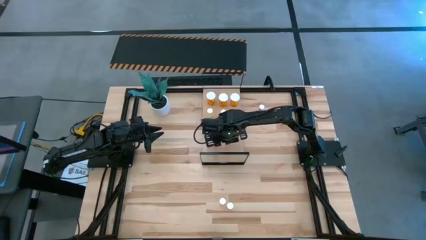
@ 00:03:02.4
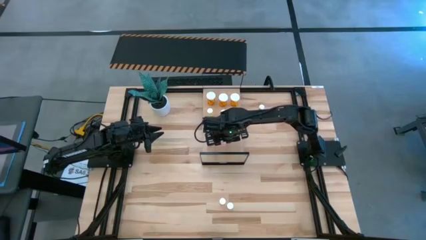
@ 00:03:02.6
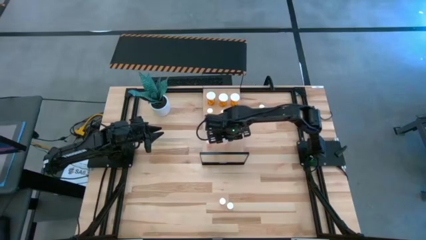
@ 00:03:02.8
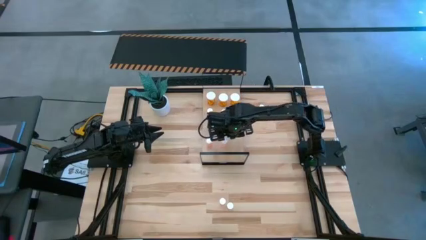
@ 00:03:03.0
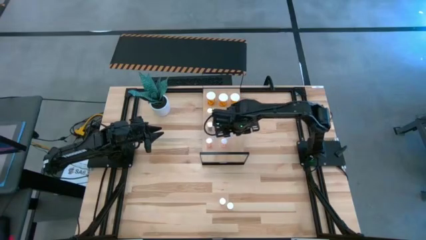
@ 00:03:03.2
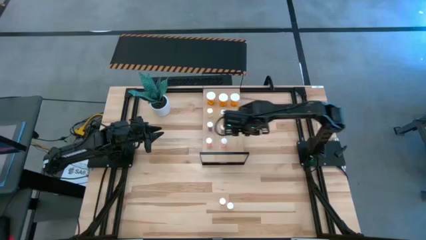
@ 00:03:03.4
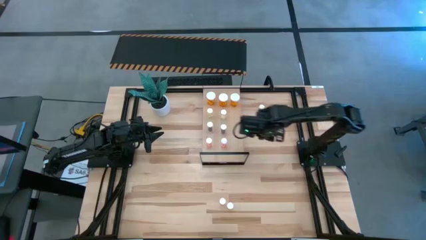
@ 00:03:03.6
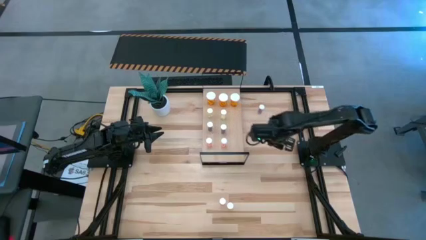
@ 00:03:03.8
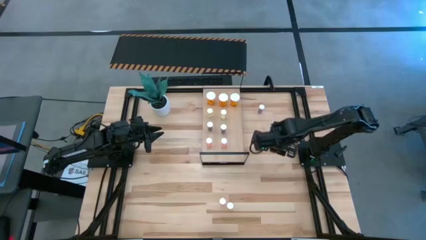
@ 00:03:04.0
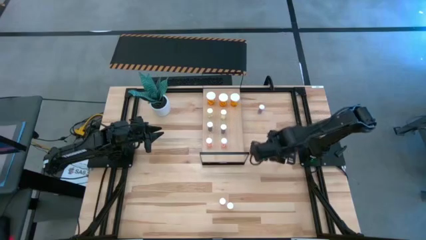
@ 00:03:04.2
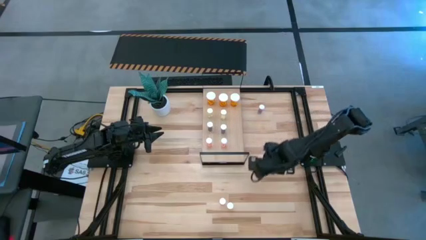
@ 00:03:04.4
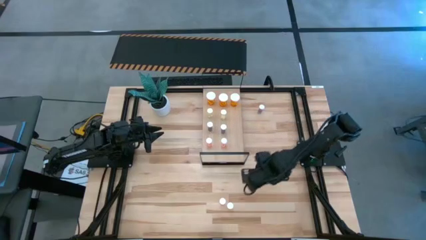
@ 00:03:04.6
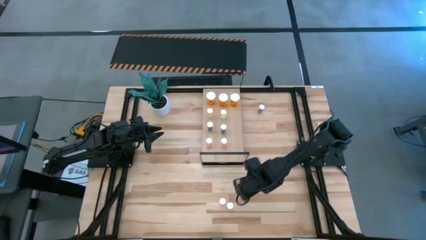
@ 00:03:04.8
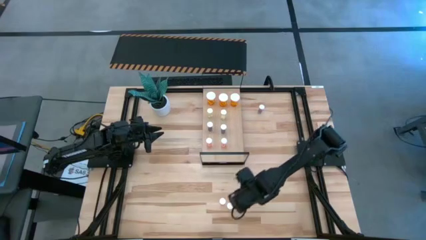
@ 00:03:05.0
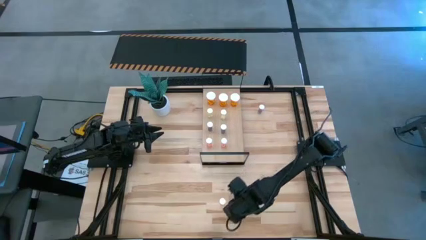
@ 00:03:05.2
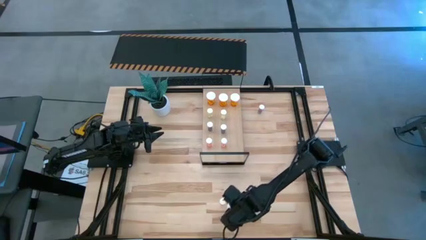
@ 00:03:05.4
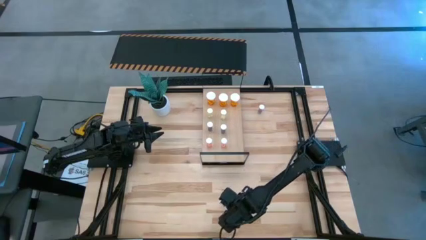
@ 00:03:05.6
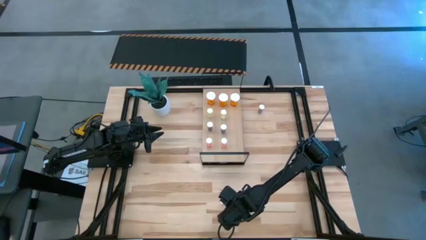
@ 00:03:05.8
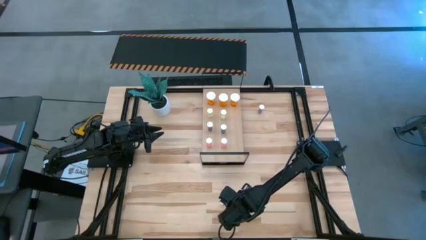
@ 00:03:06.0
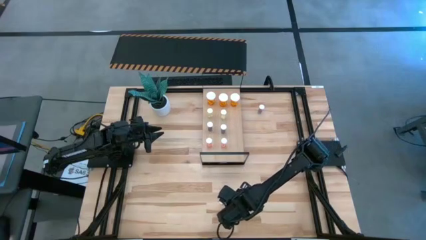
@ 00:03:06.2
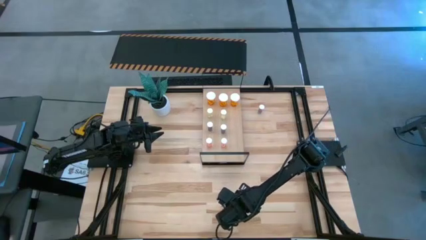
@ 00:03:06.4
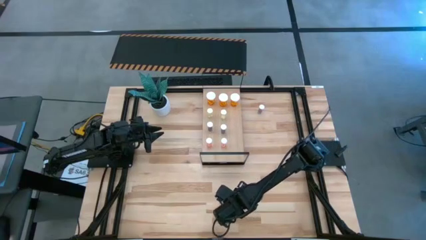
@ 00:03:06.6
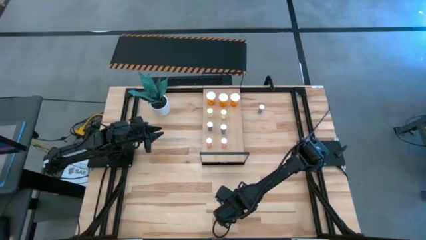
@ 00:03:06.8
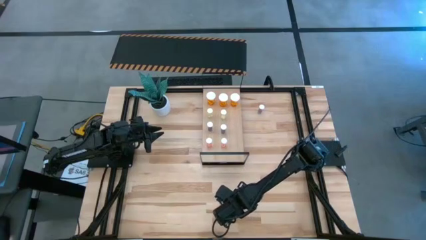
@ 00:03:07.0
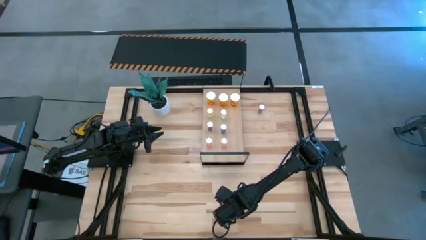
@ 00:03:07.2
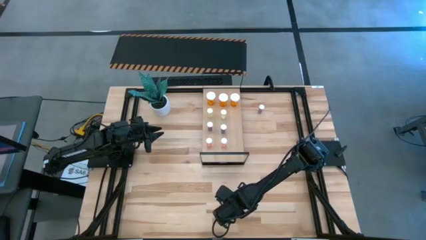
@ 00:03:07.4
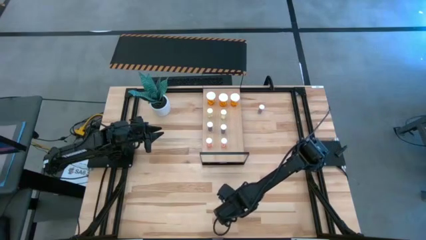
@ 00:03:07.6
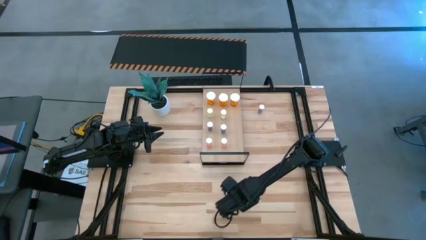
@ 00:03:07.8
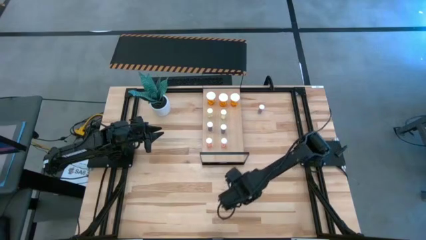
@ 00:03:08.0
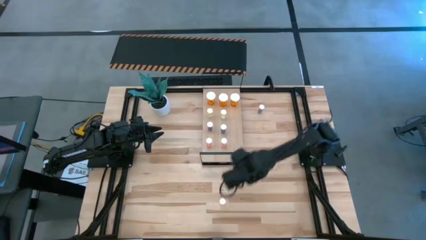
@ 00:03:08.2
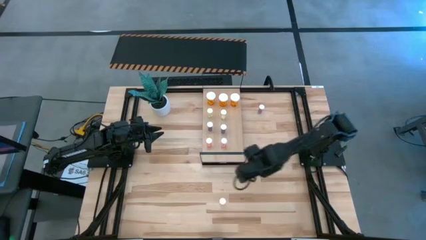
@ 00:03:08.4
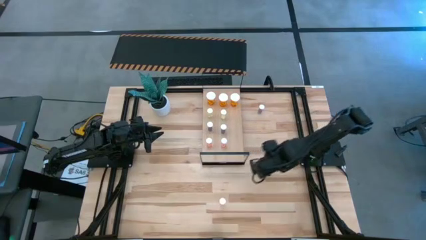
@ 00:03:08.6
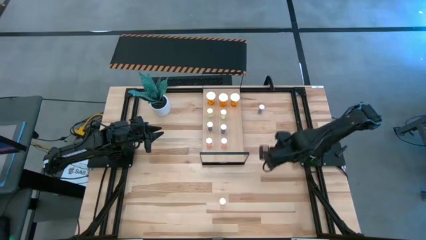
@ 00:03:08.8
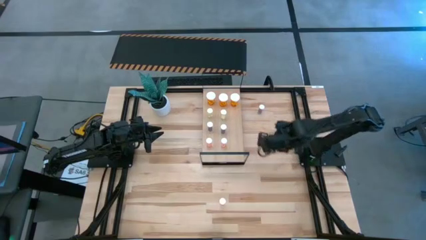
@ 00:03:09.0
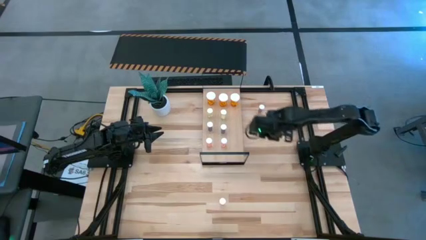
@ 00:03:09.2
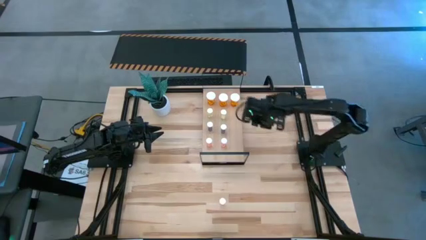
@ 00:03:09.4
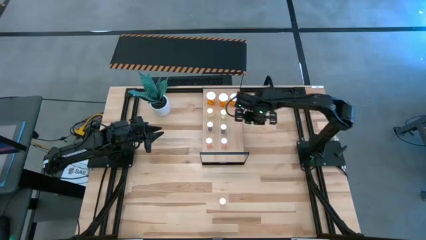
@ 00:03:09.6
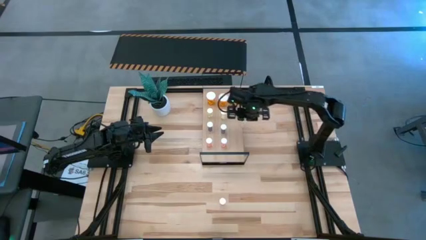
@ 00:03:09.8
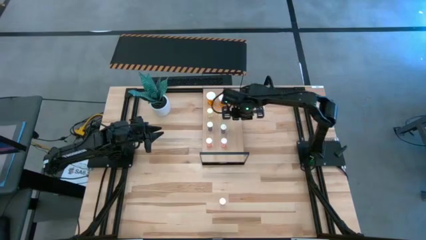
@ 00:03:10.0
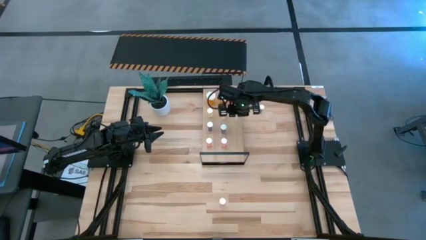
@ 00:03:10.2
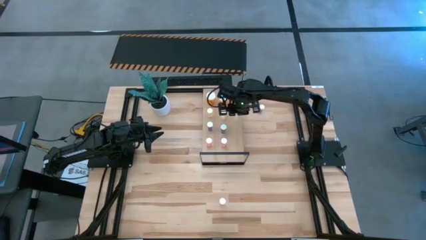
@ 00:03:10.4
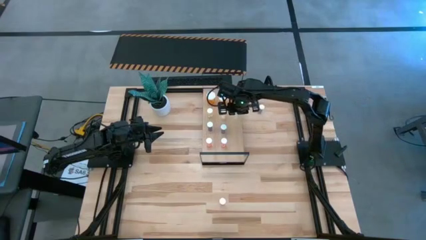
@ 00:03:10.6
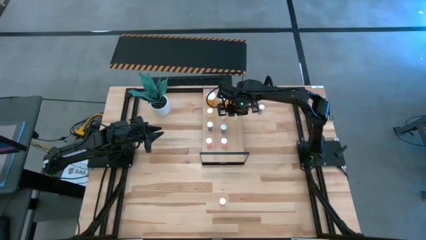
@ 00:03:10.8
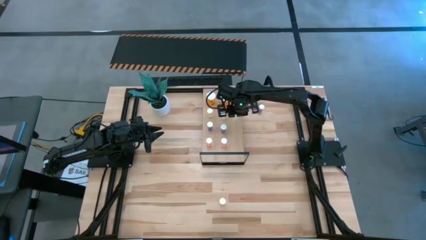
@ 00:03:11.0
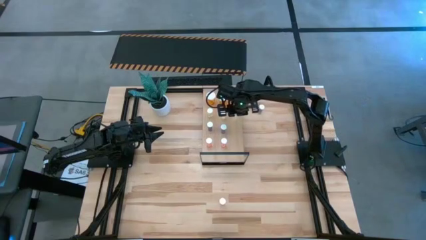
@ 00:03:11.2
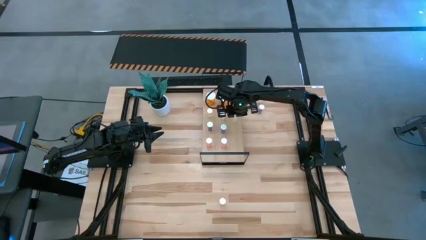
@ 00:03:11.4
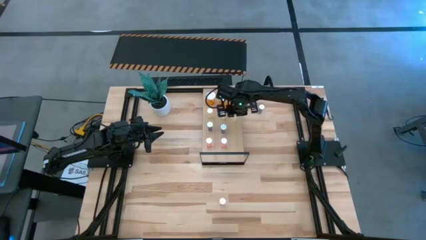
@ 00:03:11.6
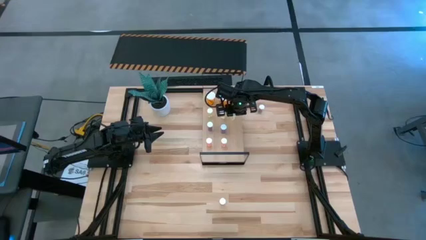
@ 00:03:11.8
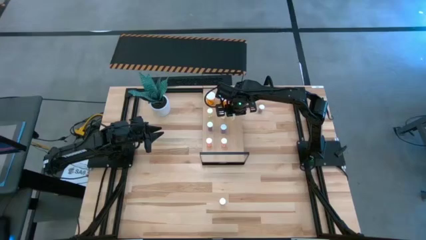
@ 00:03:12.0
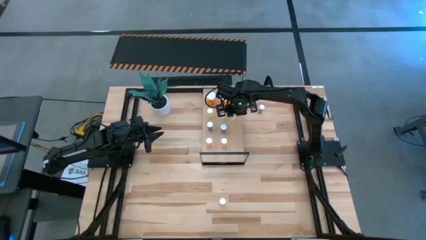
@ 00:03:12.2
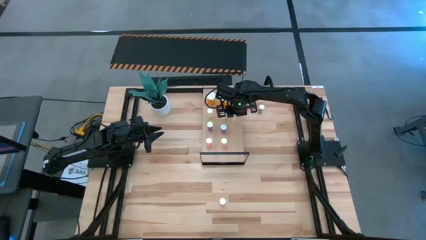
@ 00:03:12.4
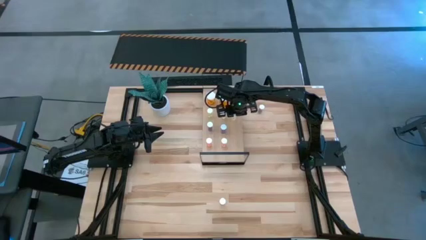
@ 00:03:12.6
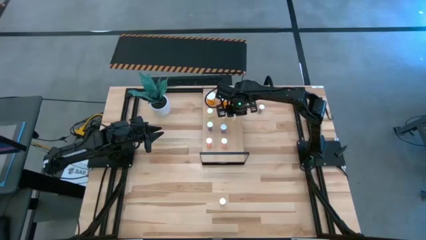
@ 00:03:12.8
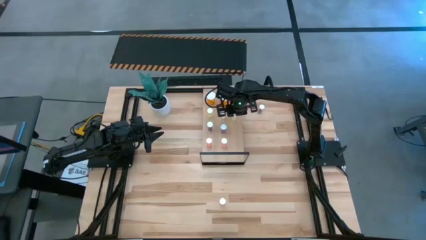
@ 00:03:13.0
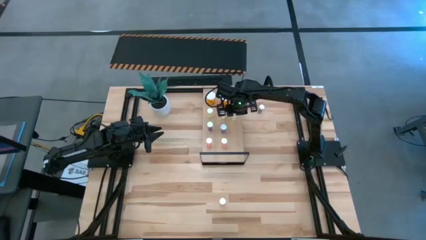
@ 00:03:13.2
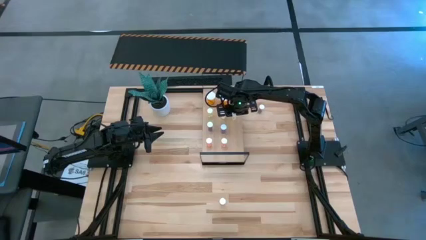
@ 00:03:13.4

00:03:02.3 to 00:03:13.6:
Task: Pick and place medicine bottles onto shelf by color
Put the small yellow pill bottle on the shelf aligned with the other small yellow pill bottles

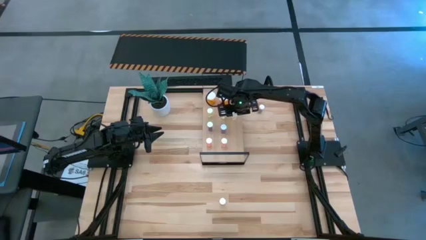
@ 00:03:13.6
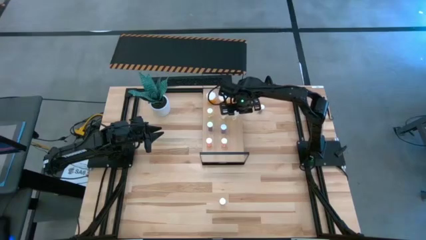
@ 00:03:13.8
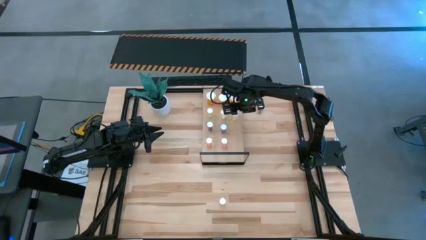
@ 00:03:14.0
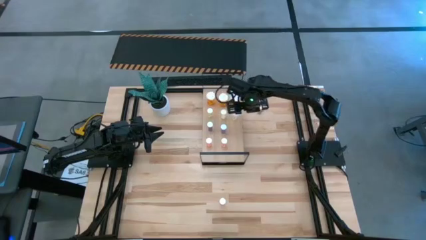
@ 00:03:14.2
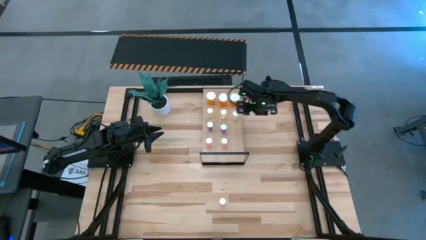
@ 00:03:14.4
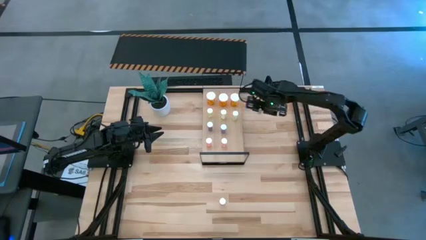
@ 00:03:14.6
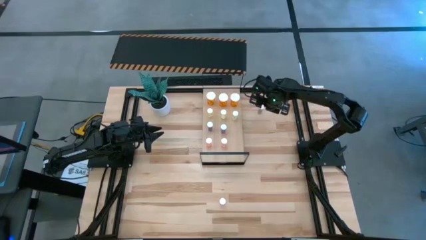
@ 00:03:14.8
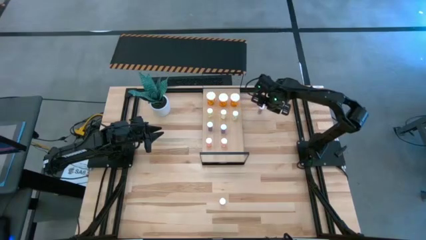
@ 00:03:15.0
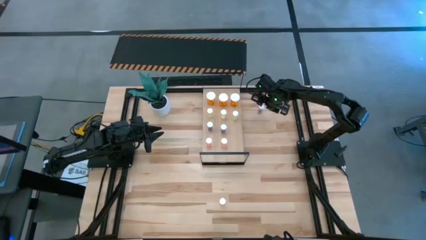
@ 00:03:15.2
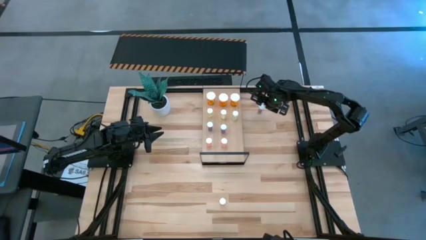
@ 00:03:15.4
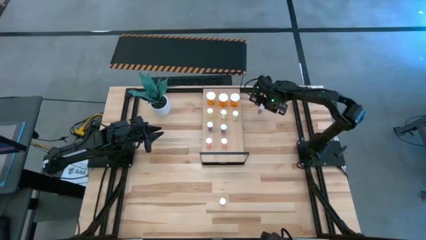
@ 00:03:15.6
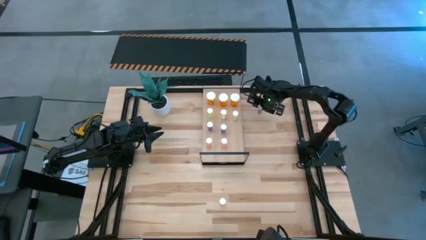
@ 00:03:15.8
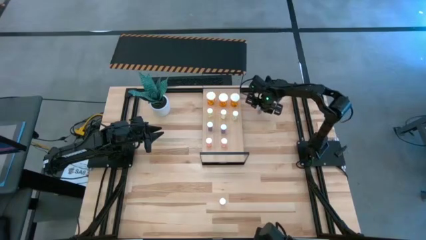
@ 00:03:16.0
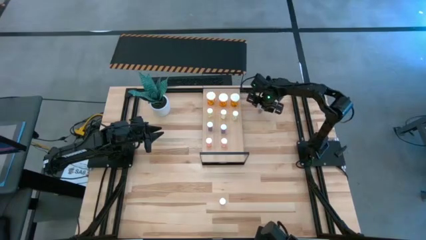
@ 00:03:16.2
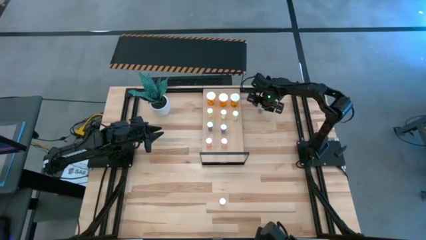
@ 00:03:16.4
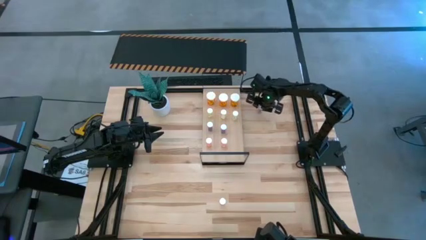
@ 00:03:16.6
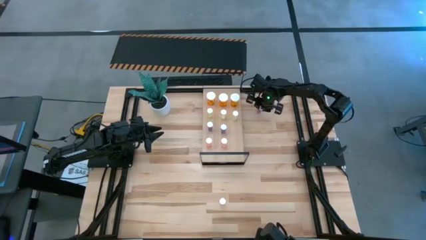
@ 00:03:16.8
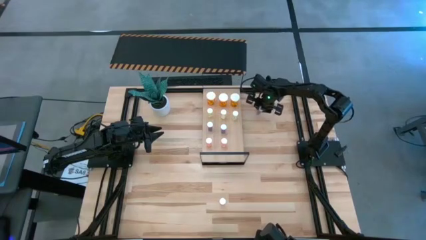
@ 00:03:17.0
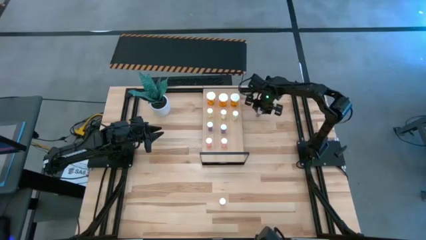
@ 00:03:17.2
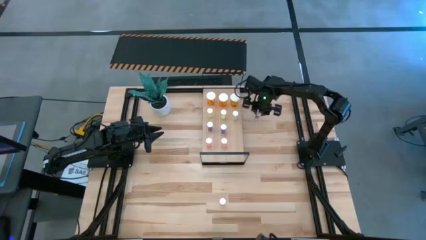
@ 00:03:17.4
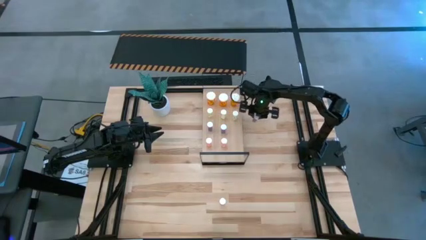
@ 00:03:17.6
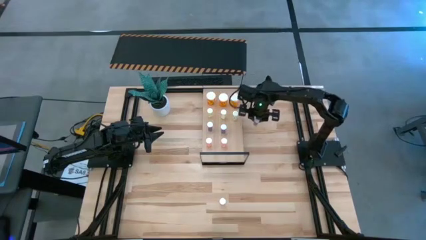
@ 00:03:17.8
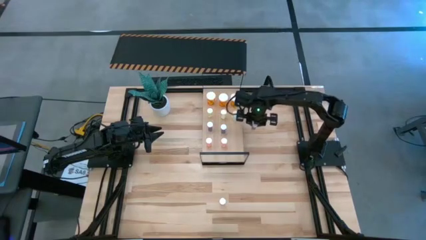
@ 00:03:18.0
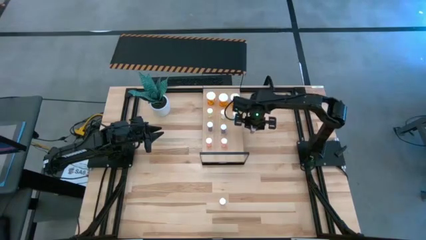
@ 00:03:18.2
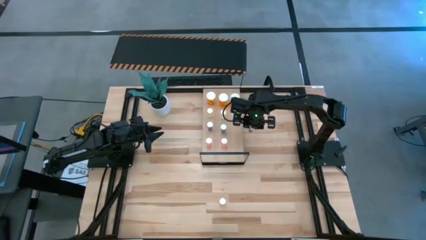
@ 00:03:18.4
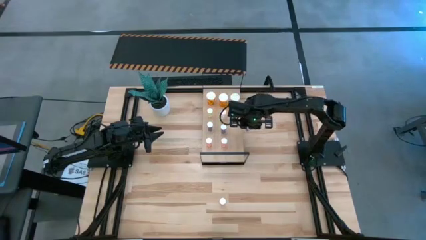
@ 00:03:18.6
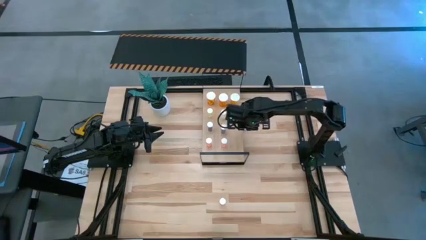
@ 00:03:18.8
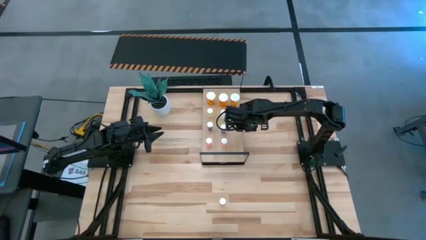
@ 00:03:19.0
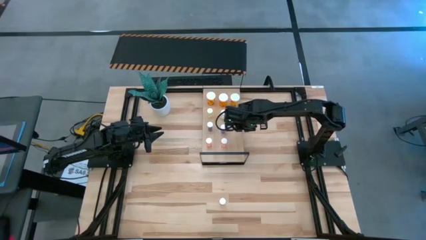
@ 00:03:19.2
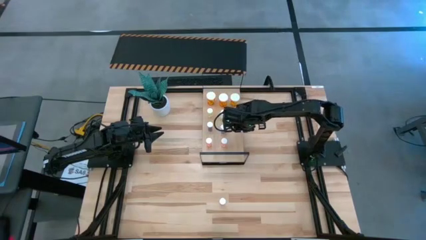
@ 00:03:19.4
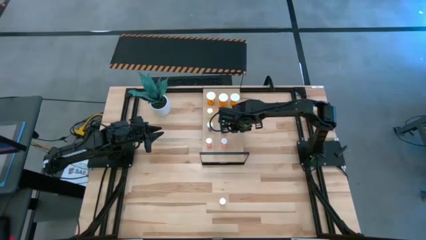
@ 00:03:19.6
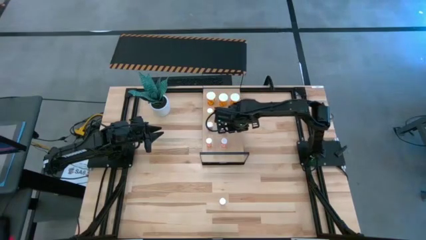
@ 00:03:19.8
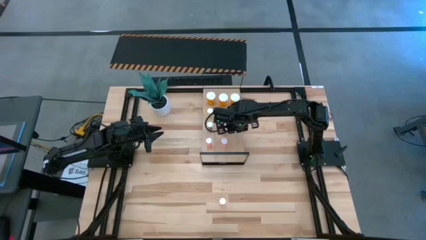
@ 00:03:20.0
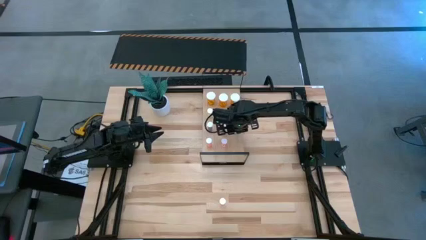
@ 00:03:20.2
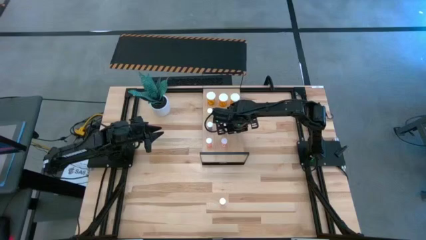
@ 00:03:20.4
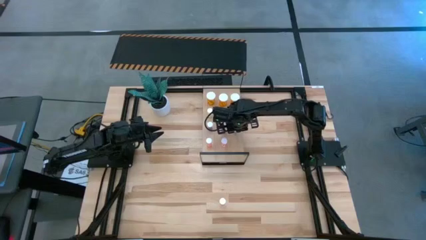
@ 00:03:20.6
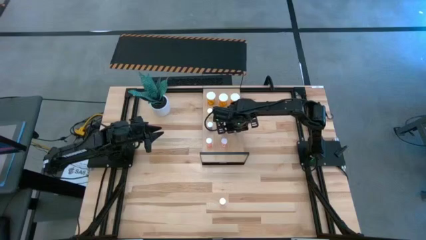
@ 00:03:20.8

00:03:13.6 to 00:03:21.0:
Put the small blue pill bottle on the shelf aligned with the other small blue pill bottles
